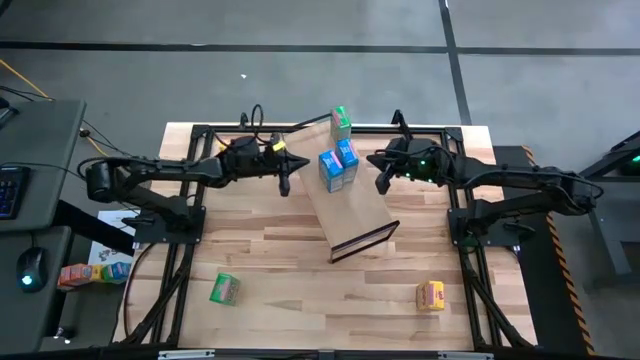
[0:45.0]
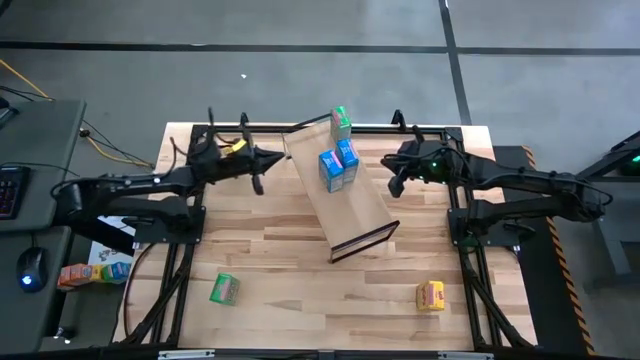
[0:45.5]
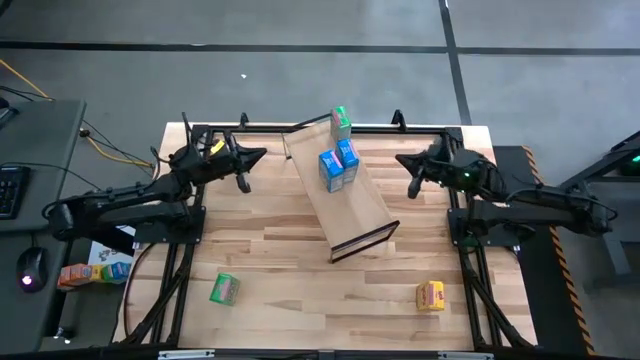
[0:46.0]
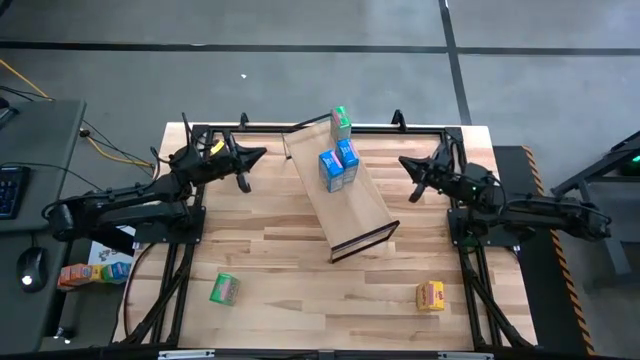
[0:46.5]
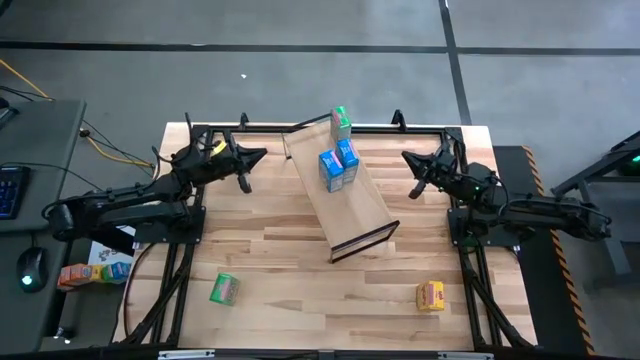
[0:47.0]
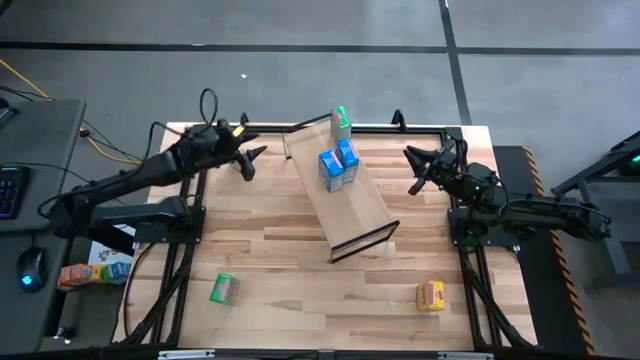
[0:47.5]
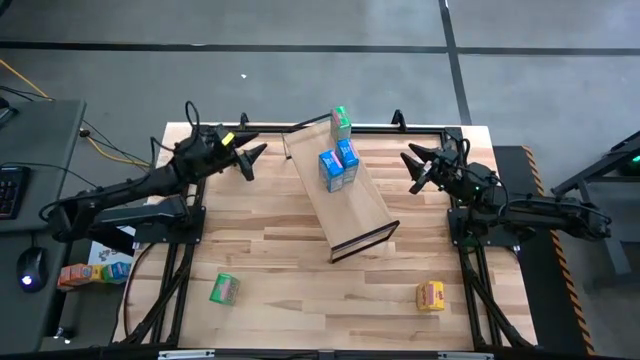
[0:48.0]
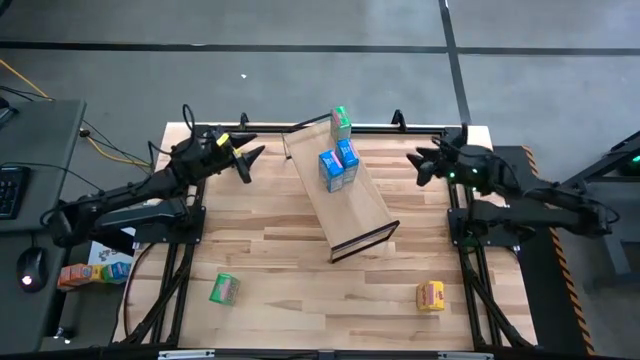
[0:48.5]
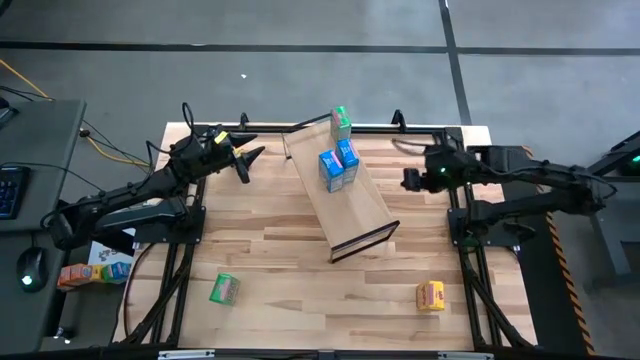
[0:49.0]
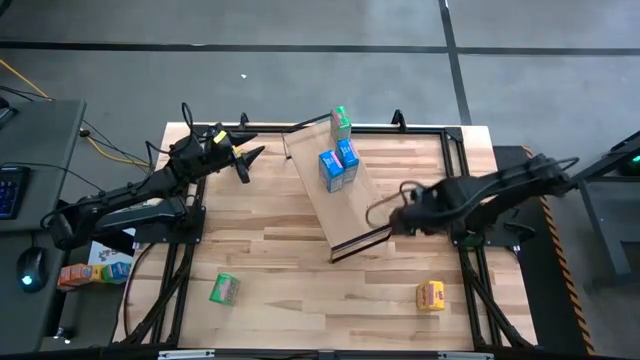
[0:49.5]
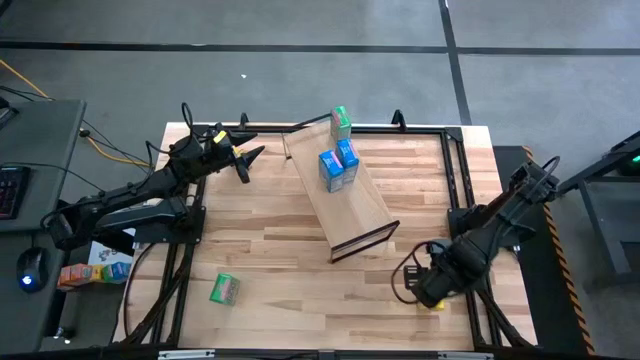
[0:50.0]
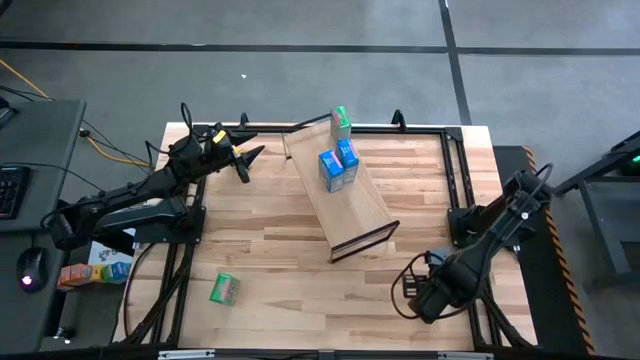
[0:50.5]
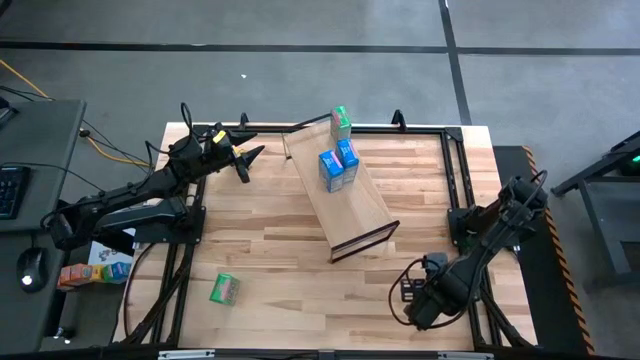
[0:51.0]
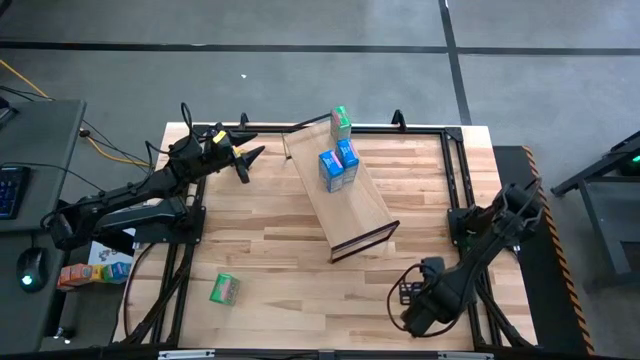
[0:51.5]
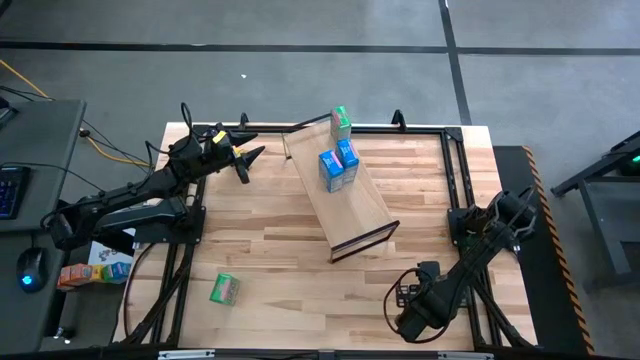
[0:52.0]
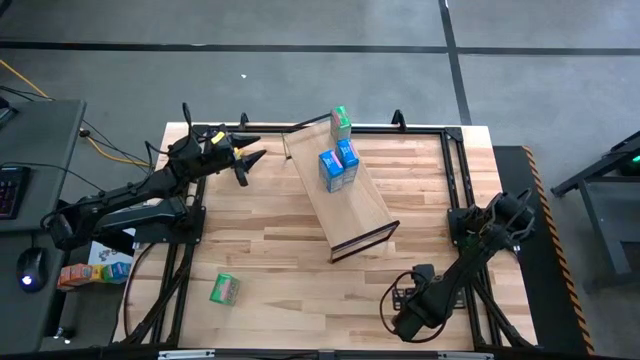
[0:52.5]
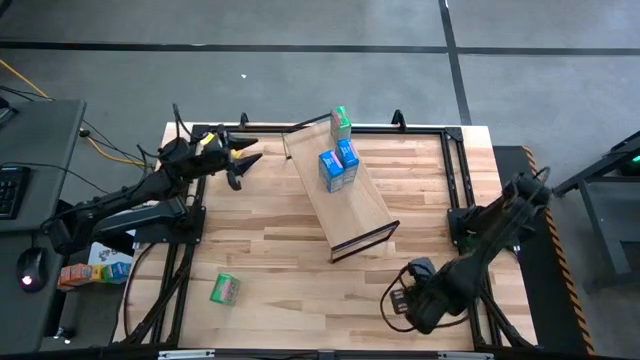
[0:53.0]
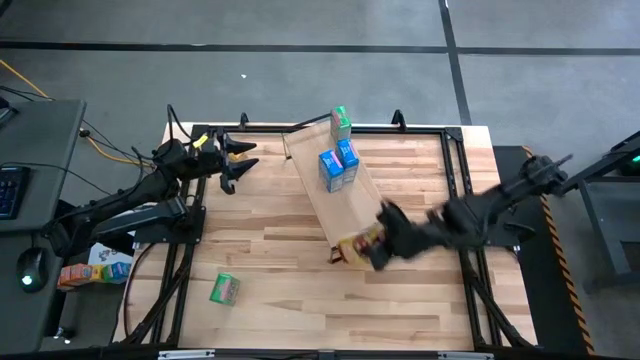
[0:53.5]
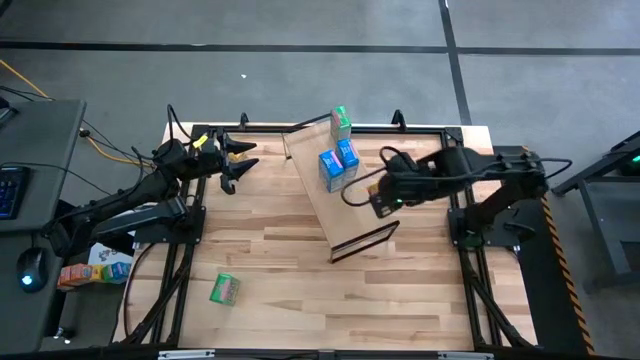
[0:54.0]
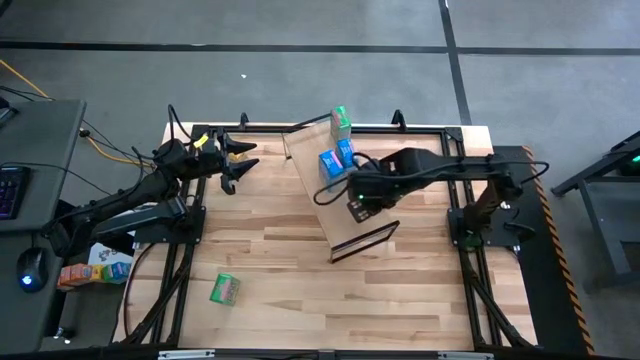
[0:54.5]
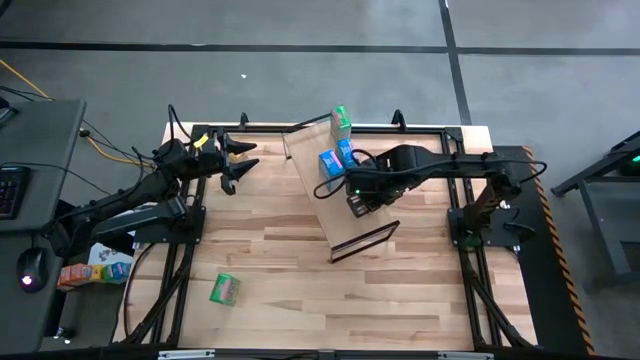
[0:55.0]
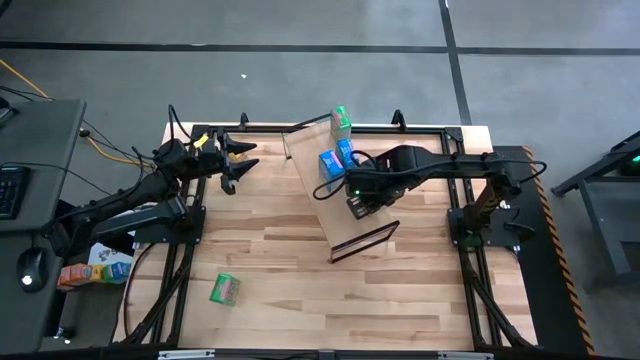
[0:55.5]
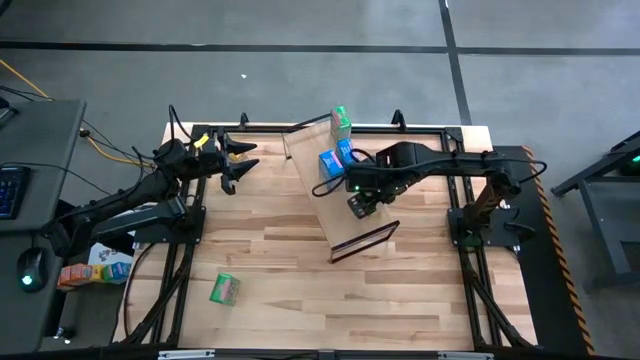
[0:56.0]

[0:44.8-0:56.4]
Task: Stack cereal on shelf
Put the bottom yellow cereal box on the shelf

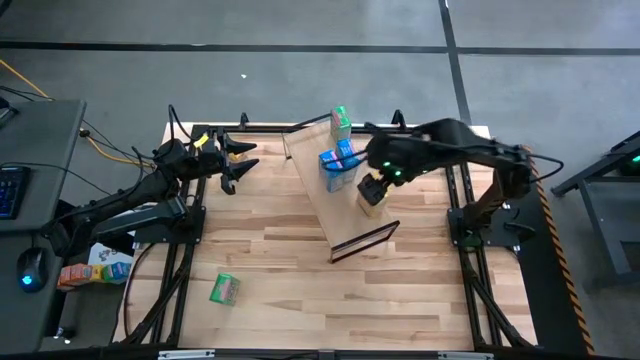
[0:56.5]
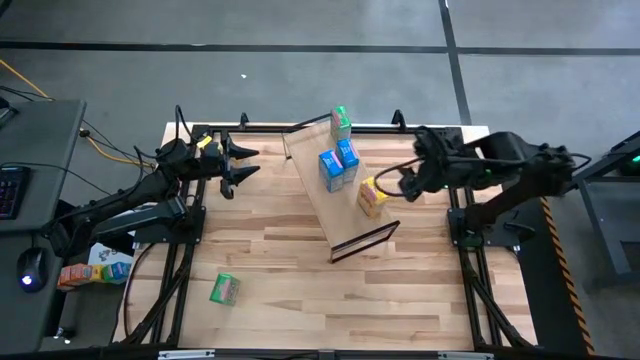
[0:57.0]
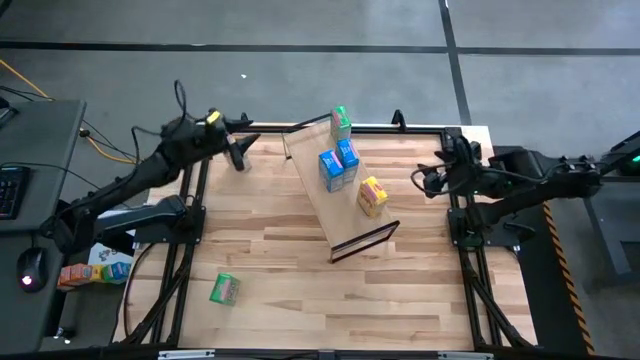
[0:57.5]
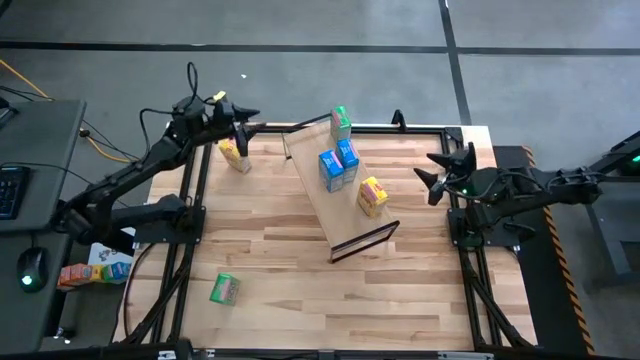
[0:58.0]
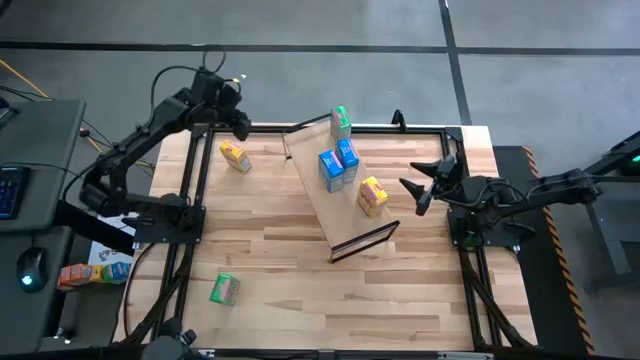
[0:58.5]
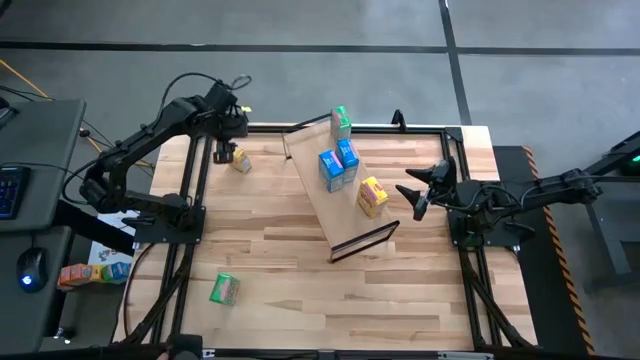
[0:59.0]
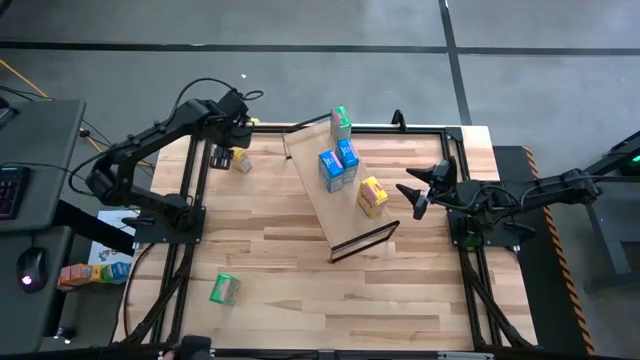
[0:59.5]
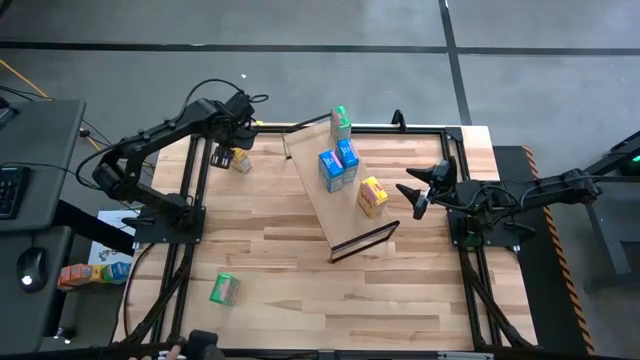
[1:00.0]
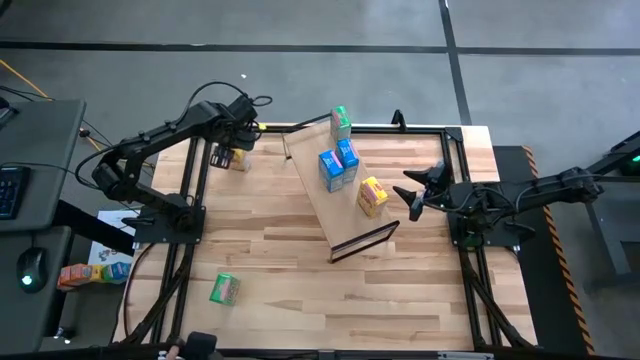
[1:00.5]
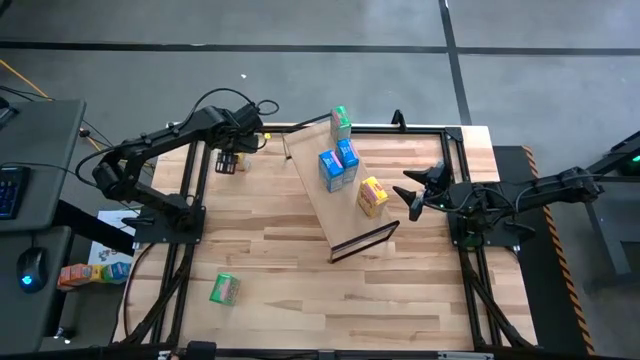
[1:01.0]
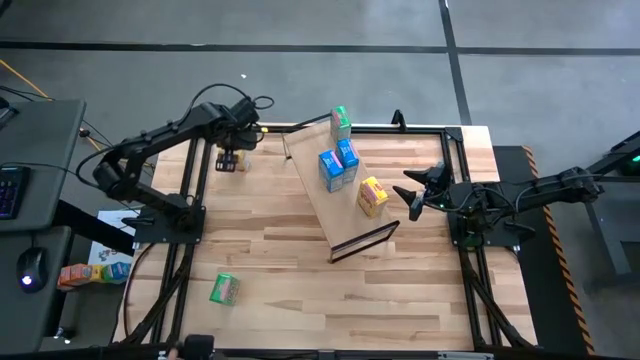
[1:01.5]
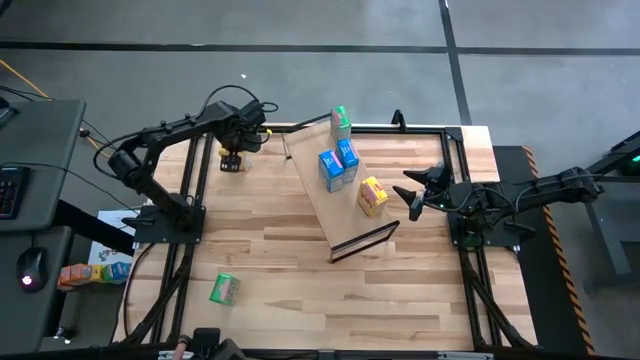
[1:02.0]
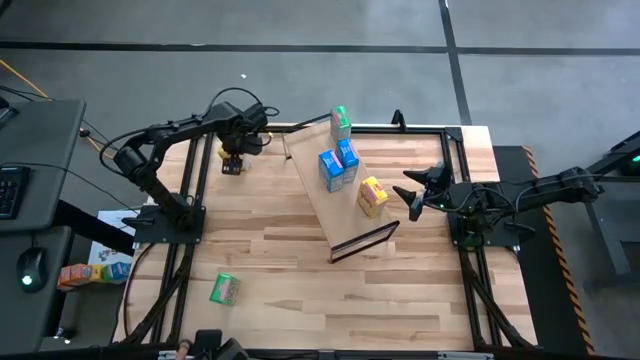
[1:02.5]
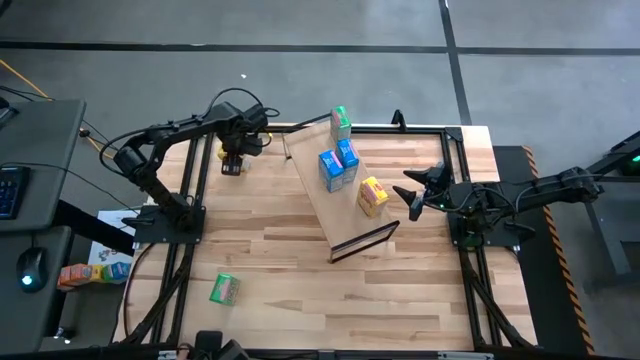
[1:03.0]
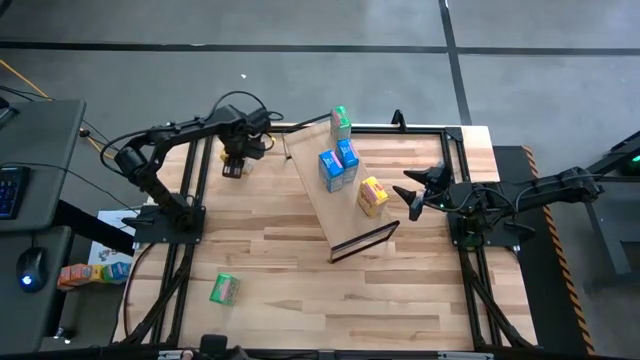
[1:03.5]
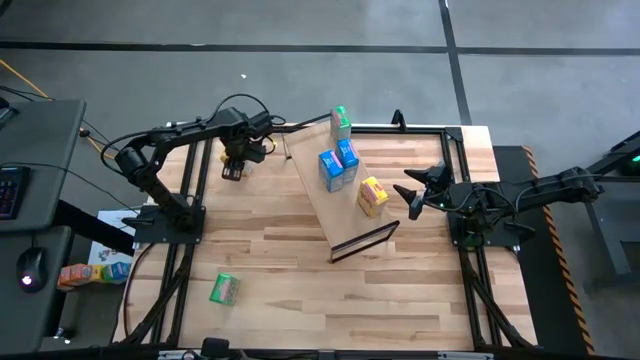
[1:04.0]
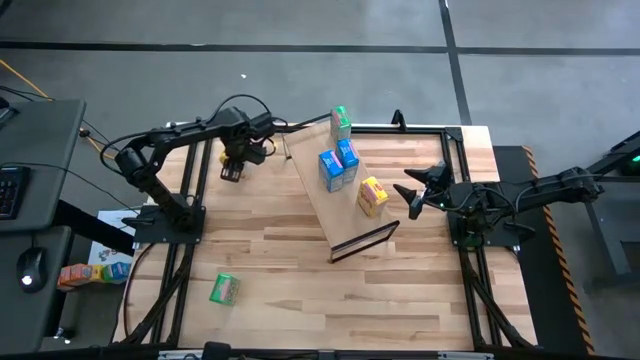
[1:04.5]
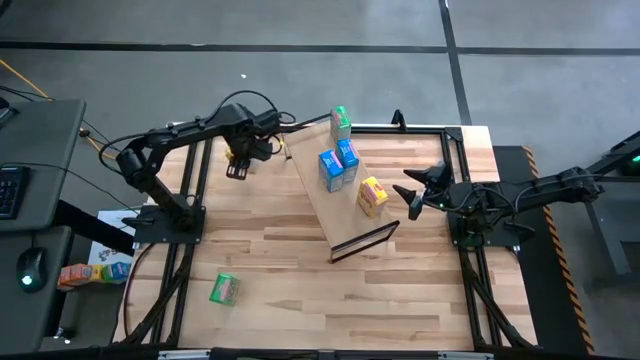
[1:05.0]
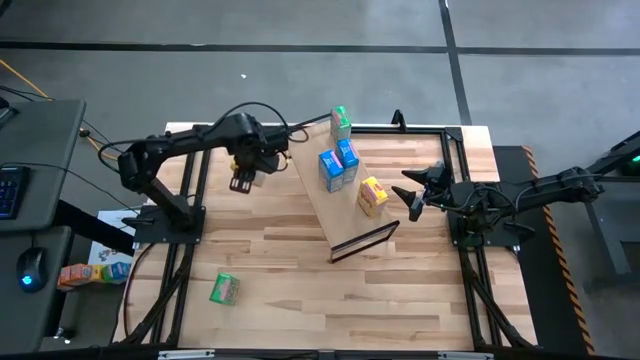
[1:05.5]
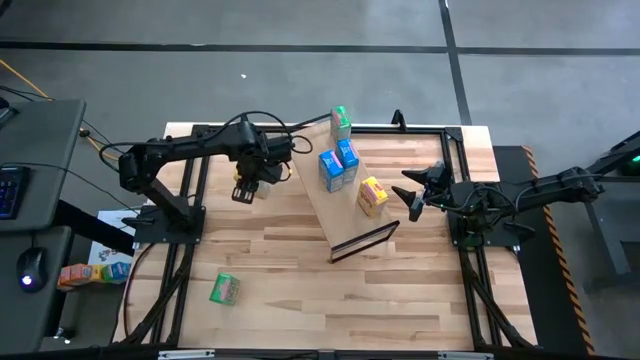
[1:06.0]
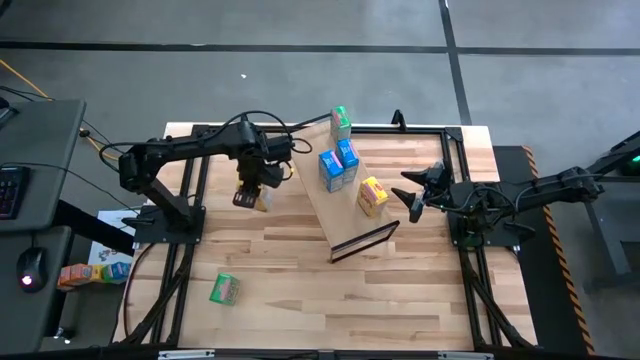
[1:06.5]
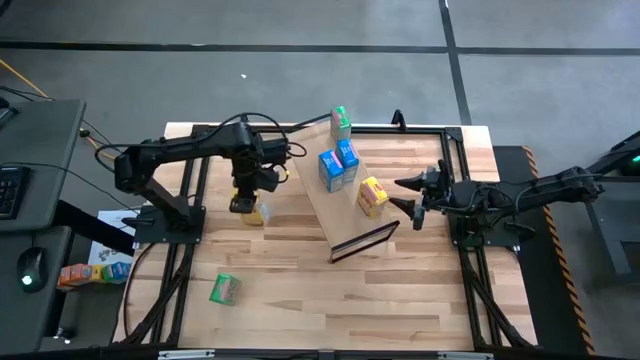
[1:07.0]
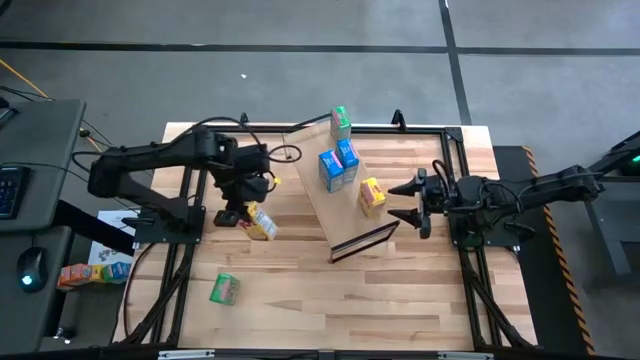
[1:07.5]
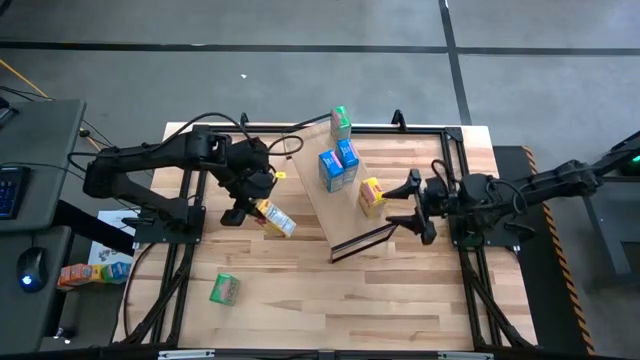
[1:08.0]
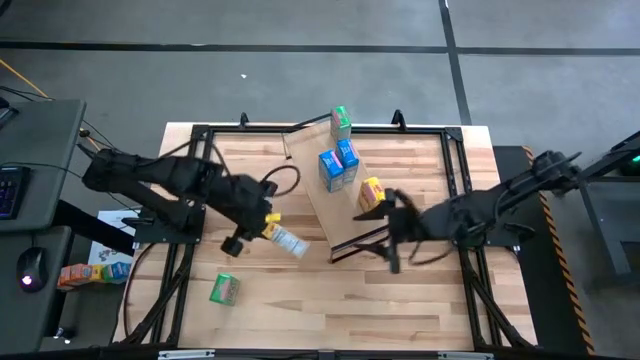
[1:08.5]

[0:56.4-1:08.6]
Put the yellow cereal box on the shelf aligned with the other yellow cereal box
